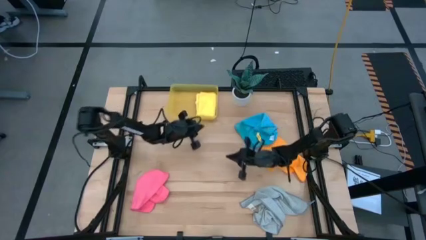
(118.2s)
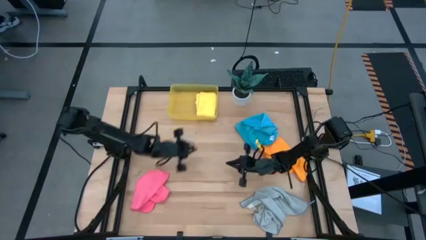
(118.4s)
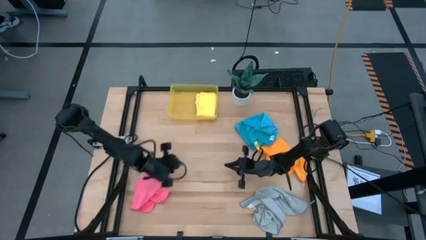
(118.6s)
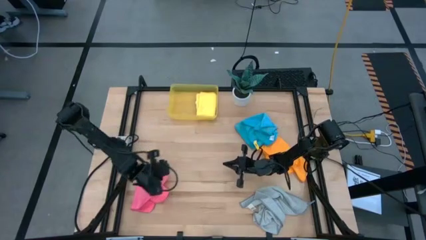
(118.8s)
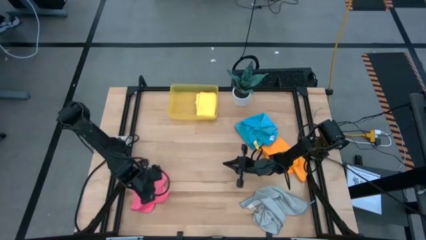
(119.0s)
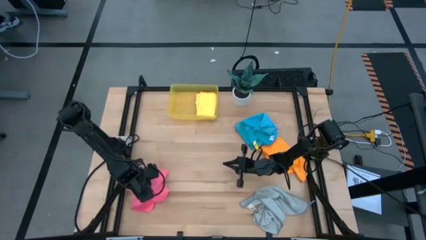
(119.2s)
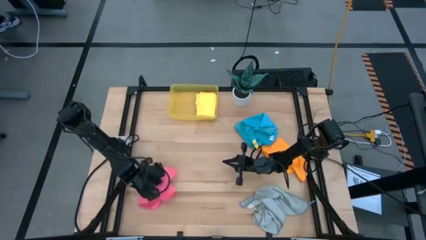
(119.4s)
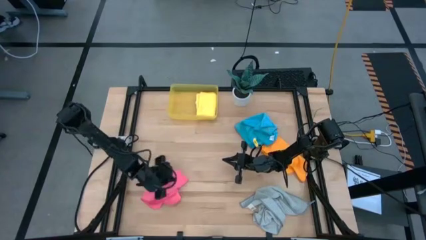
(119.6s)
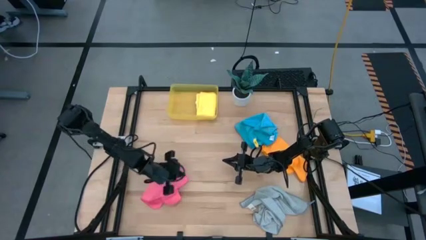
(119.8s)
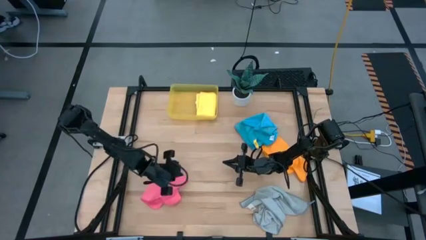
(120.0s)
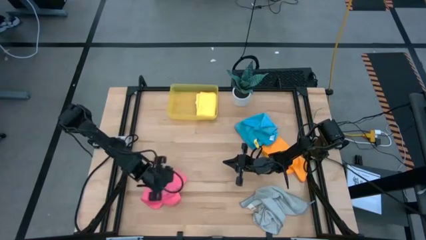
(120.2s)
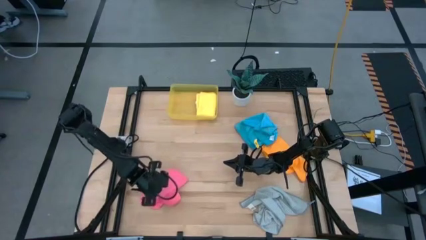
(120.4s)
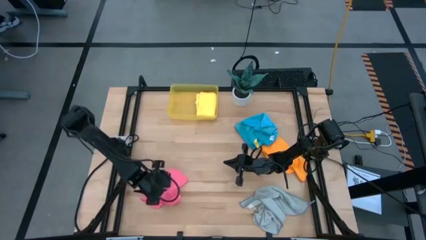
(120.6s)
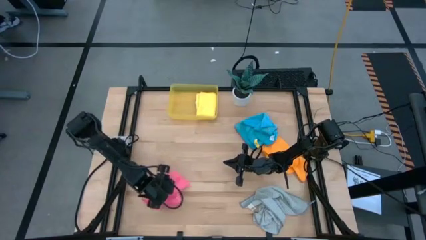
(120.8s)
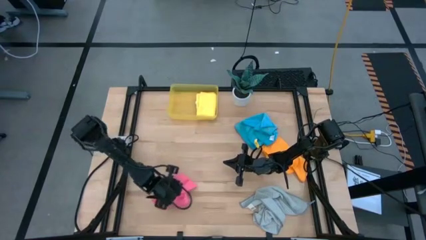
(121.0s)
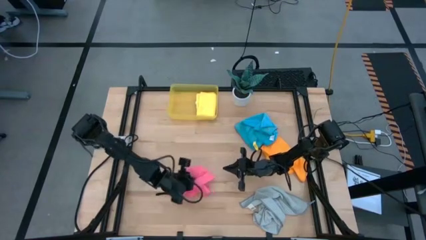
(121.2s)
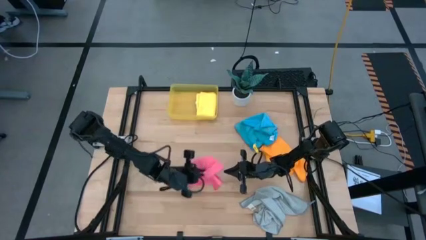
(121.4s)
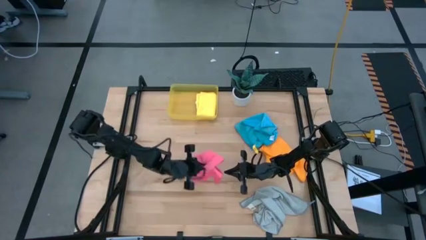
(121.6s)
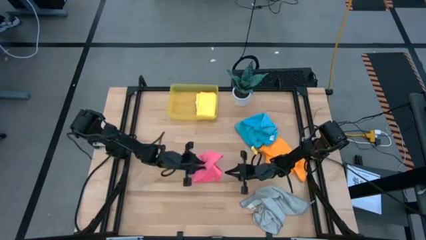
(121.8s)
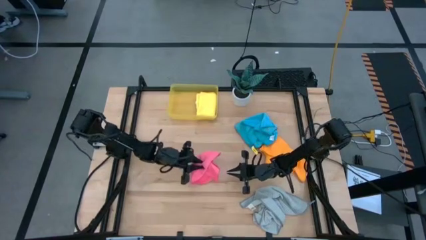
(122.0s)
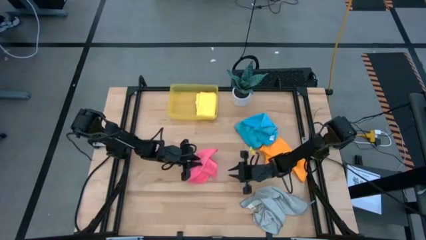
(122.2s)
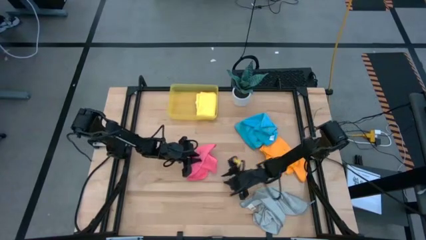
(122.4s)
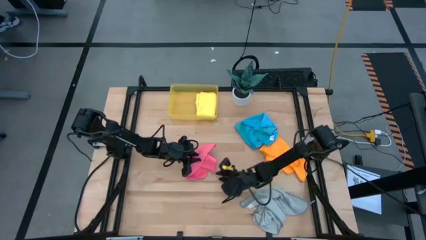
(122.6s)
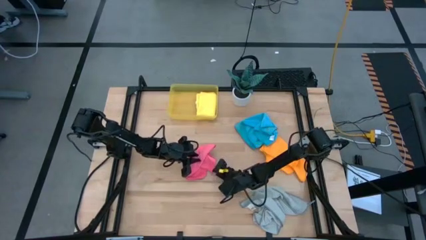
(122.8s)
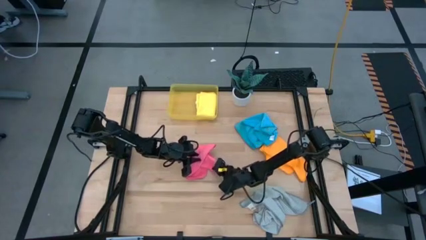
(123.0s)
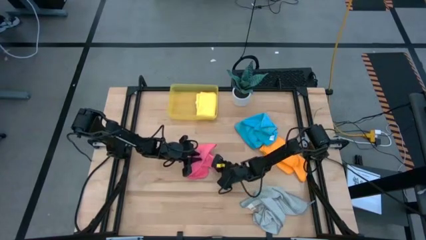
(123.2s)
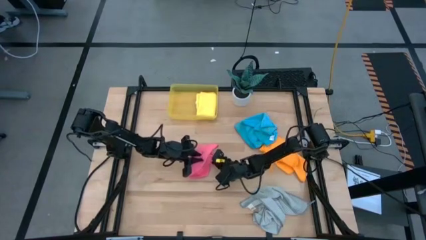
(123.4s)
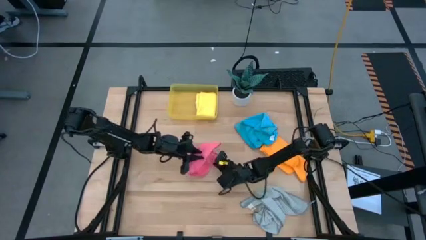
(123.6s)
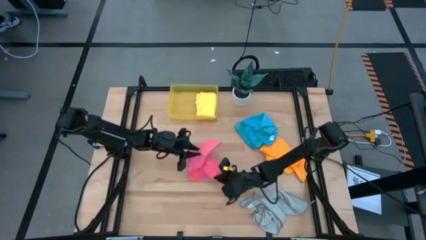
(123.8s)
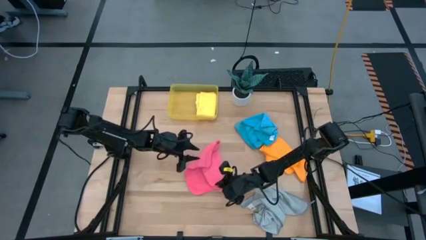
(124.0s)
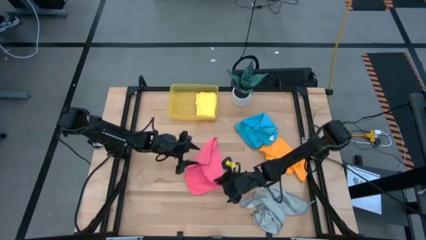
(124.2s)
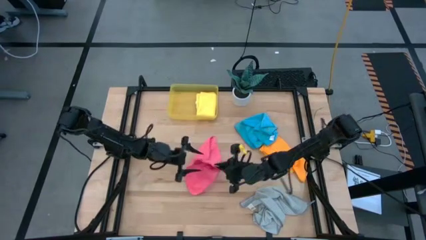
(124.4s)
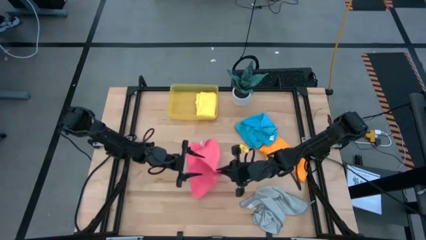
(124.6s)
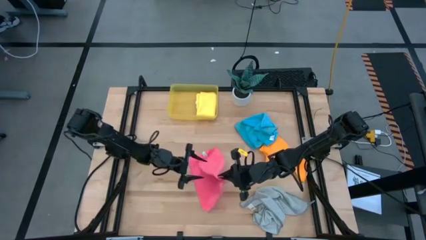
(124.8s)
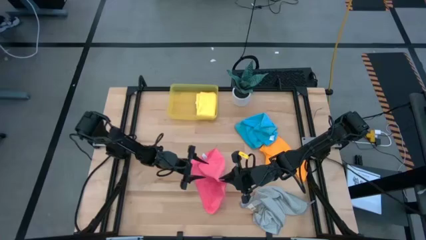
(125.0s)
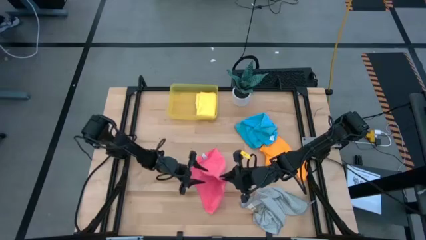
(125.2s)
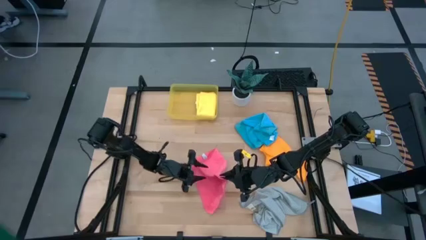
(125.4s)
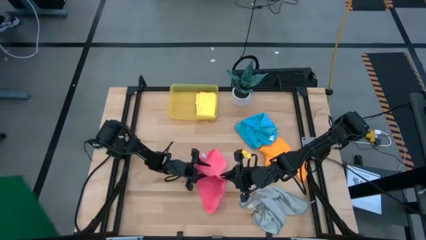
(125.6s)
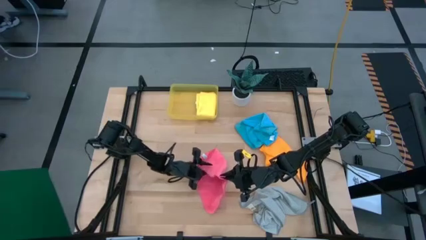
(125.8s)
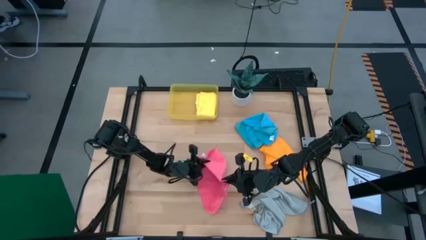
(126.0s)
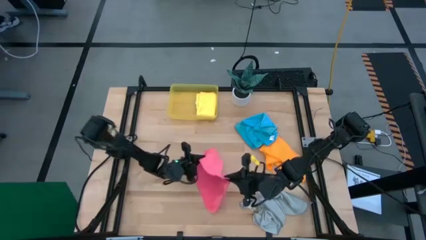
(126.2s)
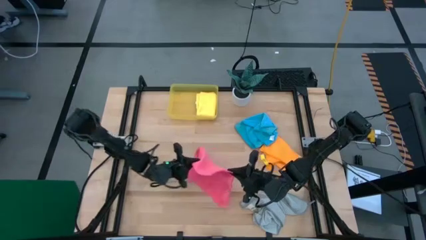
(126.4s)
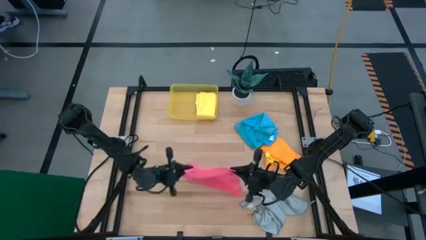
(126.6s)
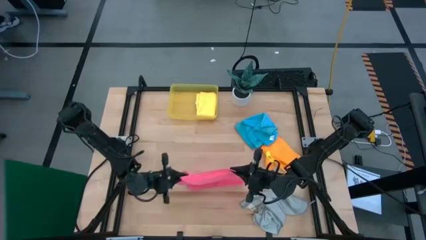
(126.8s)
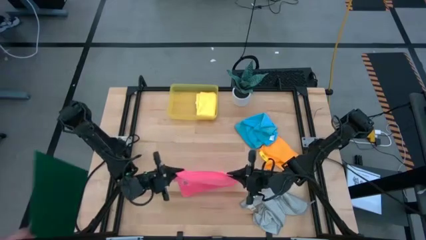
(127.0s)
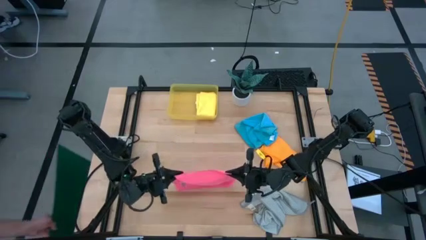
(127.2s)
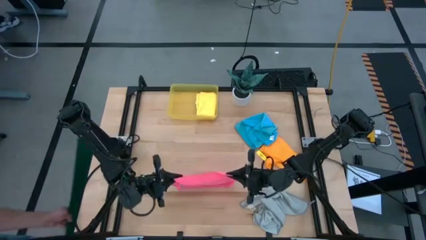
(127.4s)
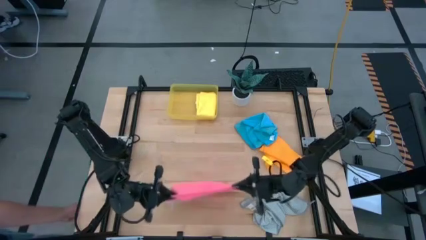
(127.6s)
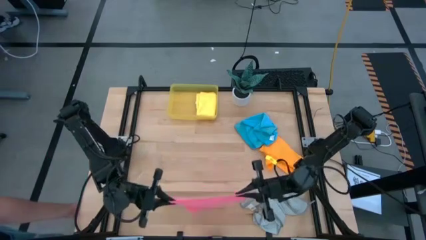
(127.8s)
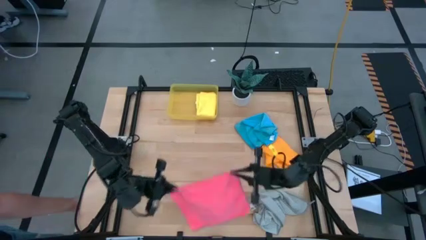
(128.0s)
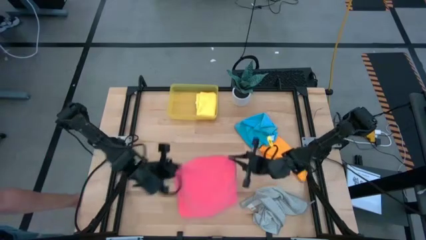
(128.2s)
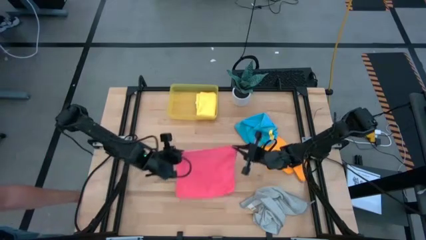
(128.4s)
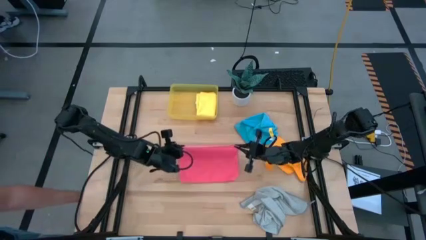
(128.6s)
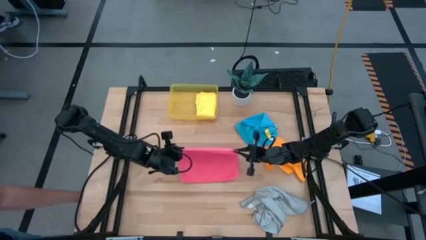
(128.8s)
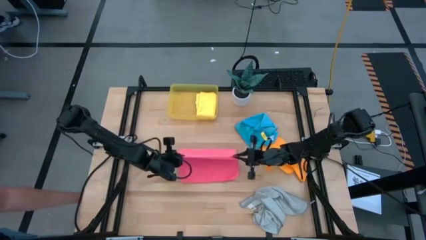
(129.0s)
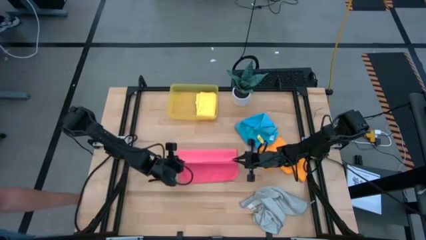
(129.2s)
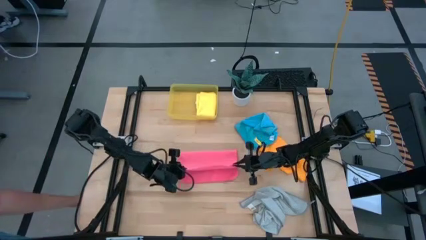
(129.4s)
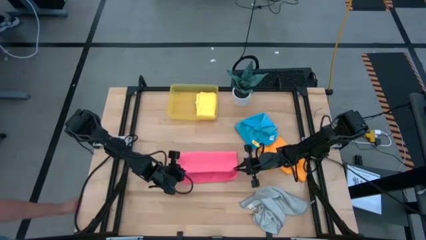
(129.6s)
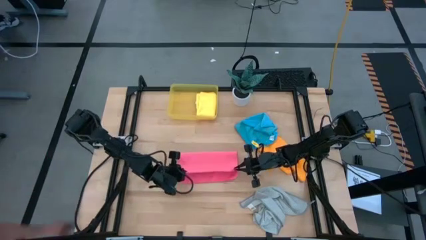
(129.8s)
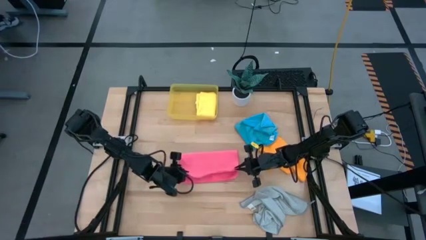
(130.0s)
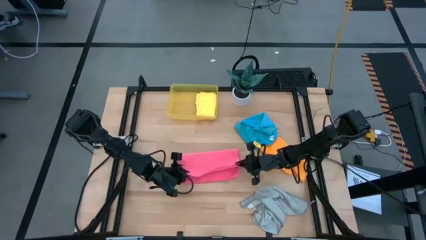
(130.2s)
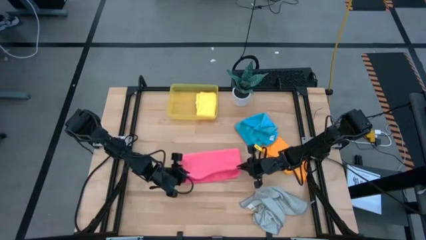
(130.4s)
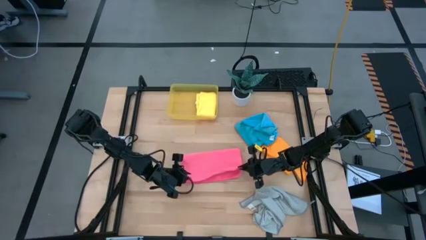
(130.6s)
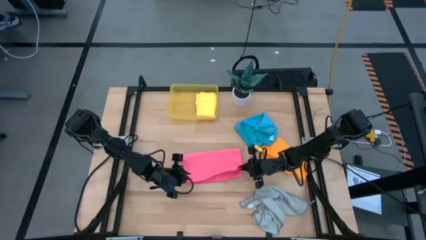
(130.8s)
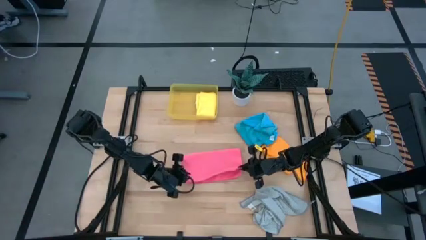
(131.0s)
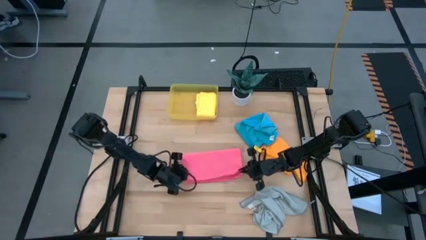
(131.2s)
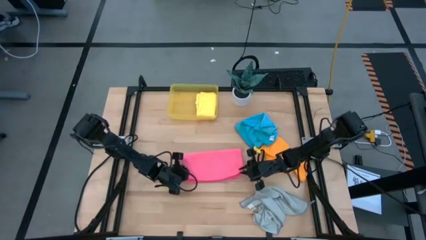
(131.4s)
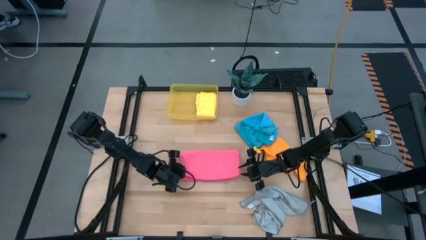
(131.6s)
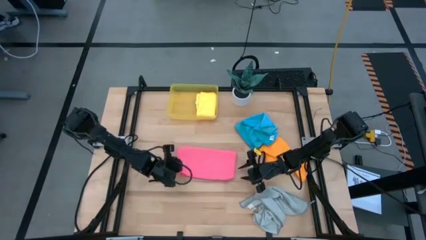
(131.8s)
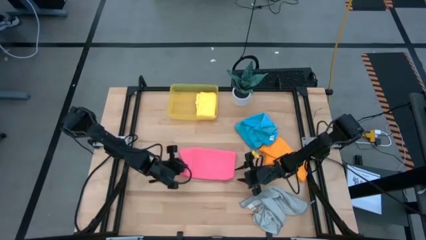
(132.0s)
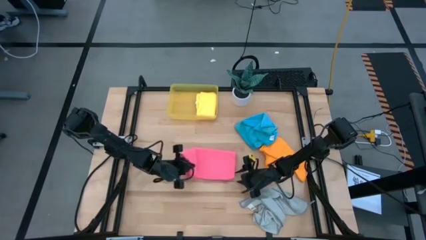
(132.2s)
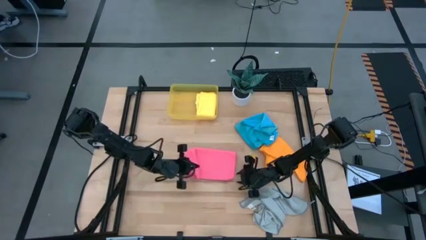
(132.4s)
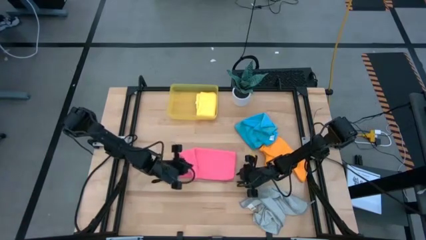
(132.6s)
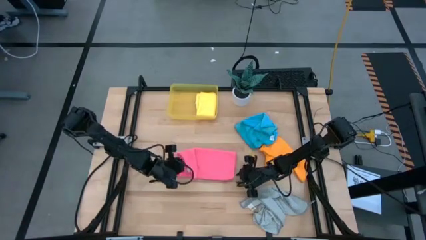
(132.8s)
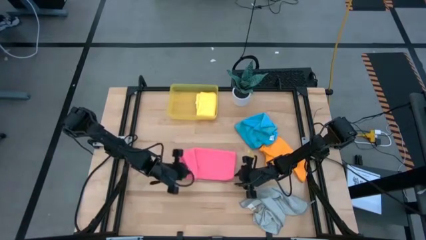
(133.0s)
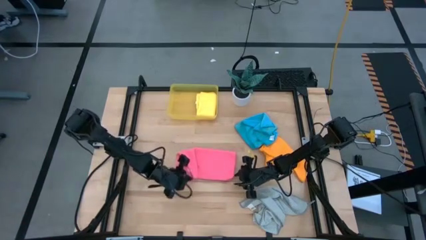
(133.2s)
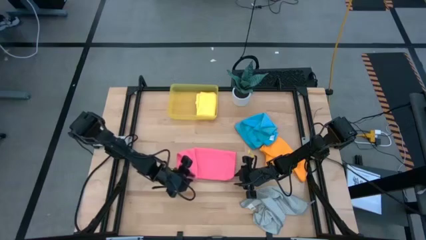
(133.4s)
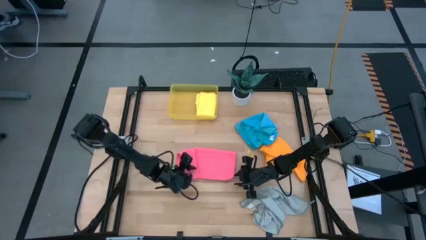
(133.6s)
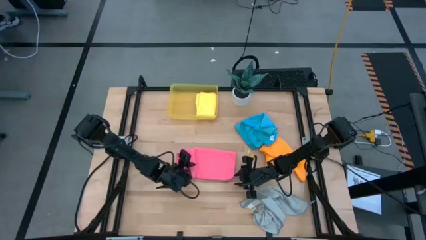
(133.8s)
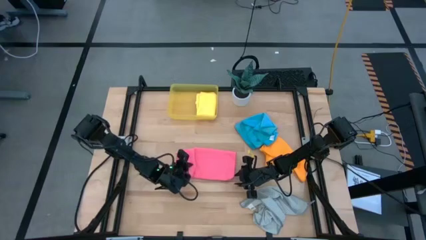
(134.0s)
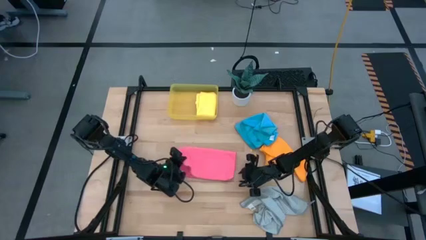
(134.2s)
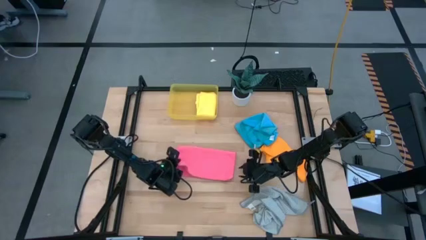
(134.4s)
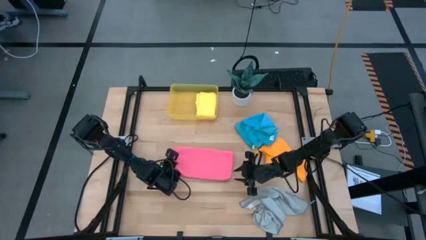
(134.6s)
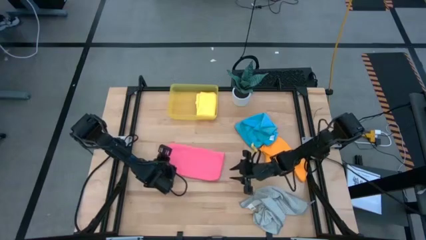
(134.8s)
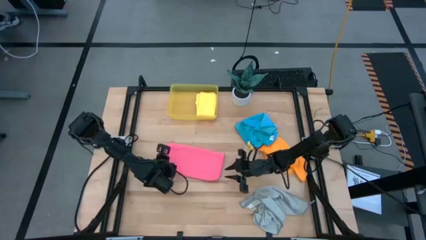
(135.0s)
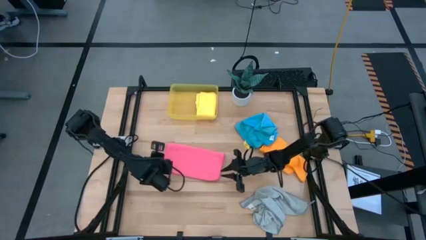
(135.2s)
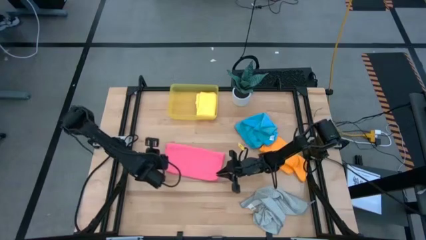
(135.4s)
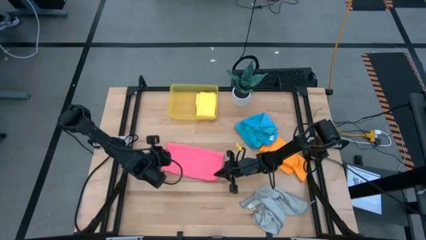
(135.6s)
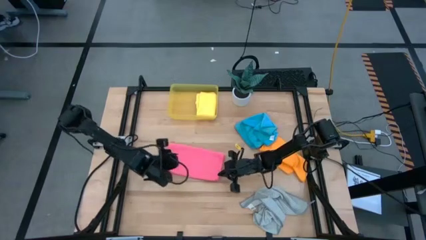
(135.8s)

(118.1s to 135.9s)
Task: Fold microfiber towels
Fold the pink microfiber cloth
